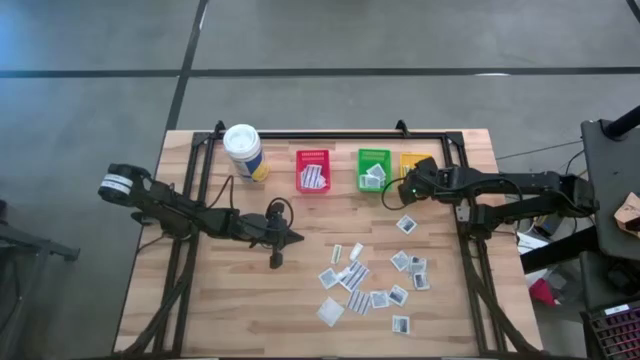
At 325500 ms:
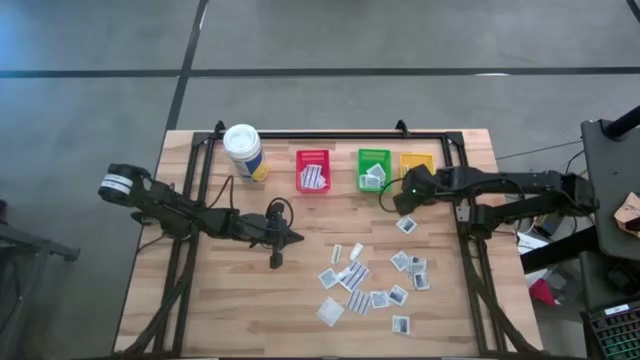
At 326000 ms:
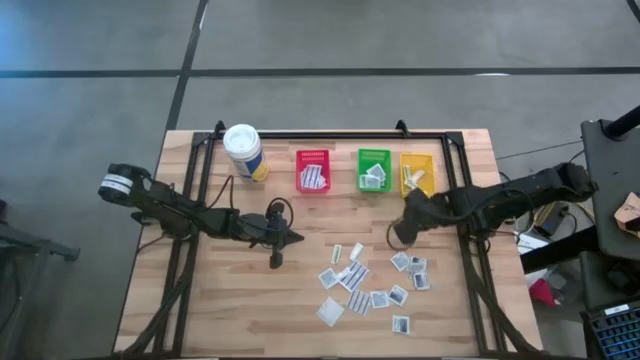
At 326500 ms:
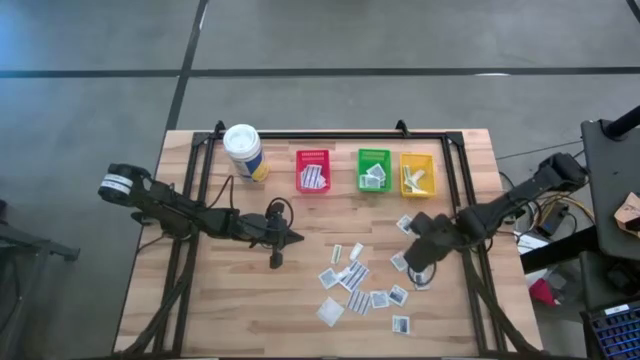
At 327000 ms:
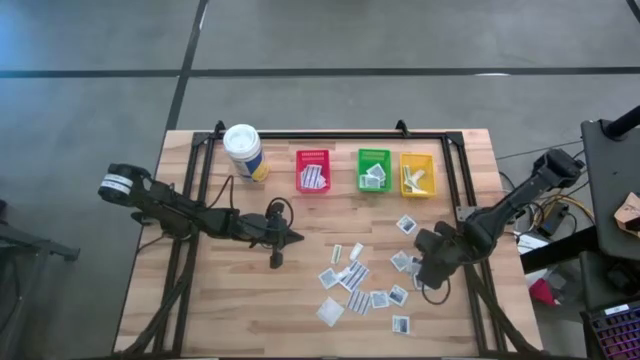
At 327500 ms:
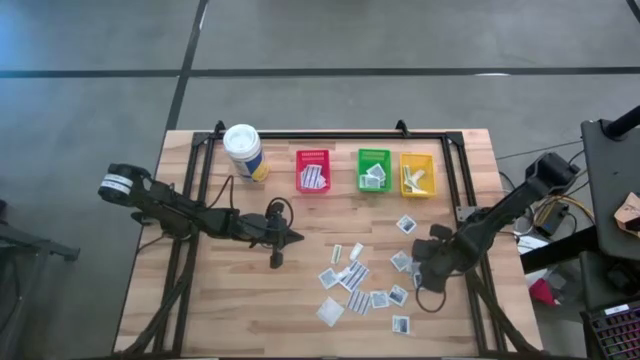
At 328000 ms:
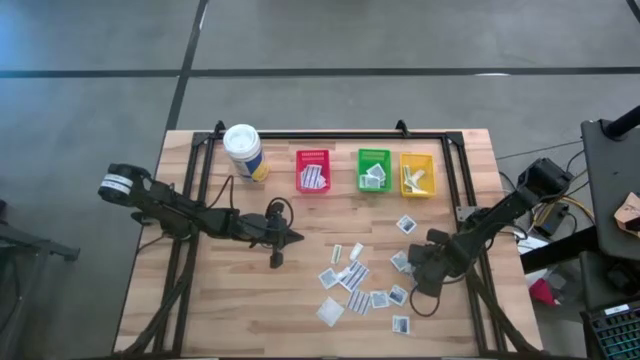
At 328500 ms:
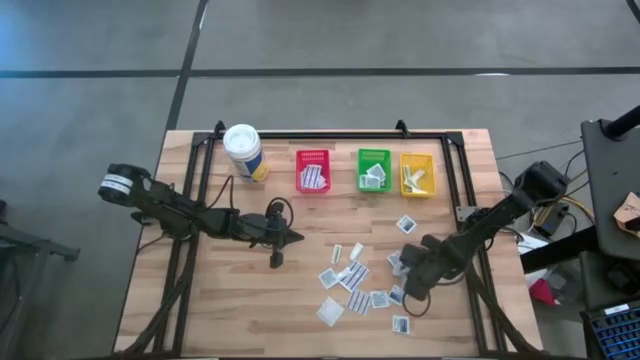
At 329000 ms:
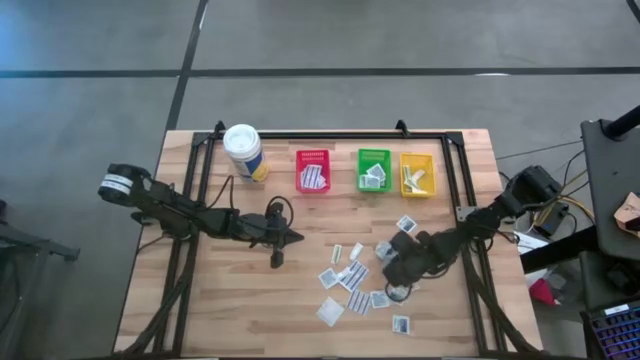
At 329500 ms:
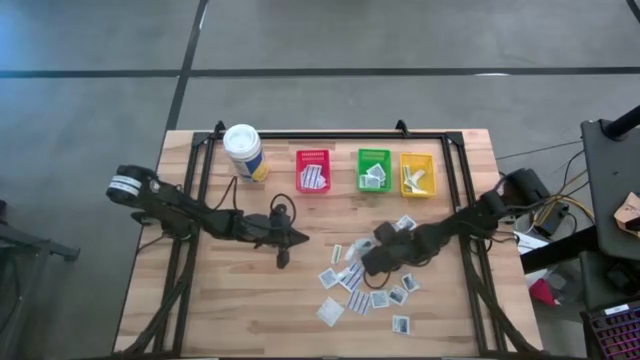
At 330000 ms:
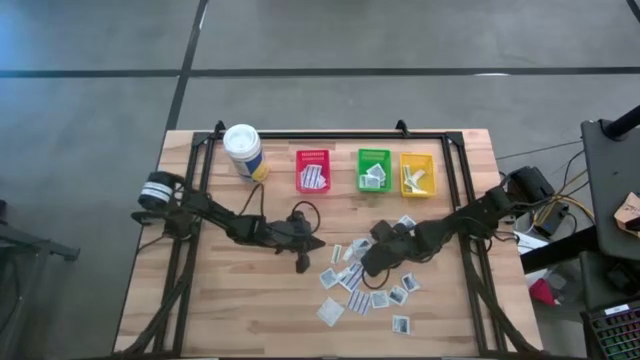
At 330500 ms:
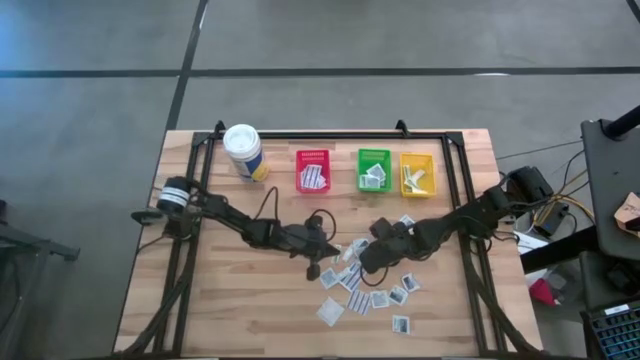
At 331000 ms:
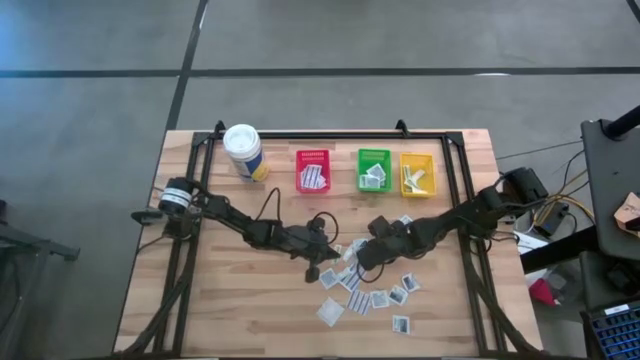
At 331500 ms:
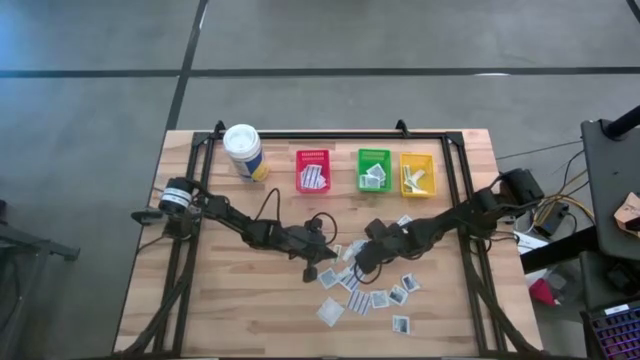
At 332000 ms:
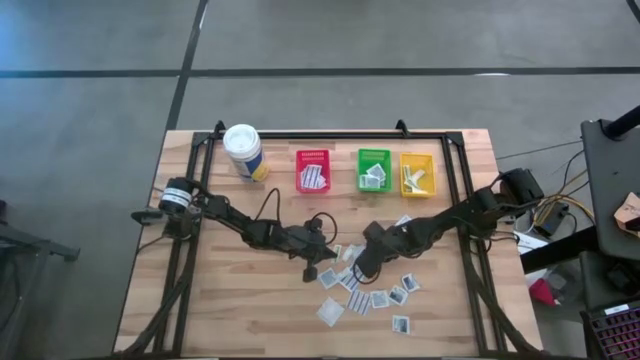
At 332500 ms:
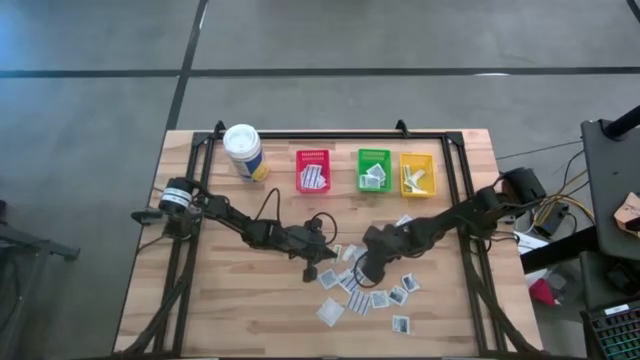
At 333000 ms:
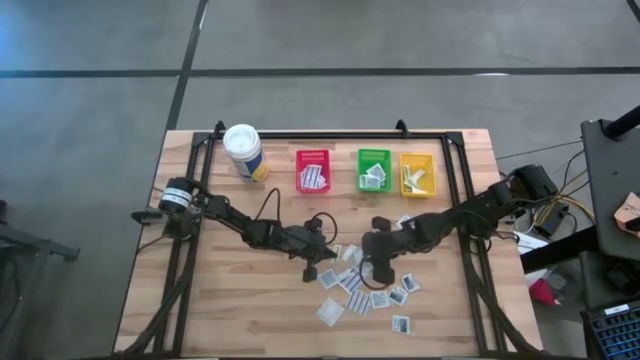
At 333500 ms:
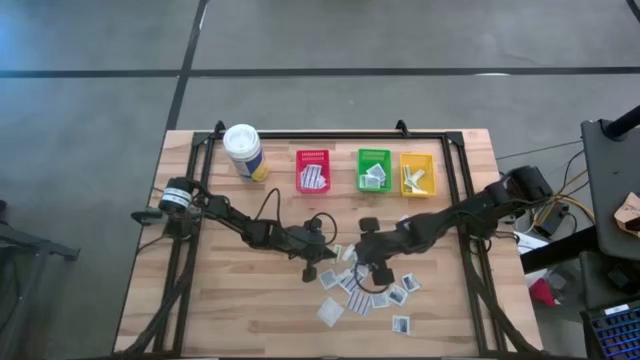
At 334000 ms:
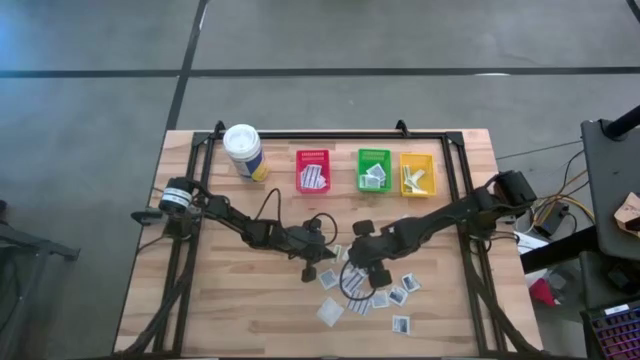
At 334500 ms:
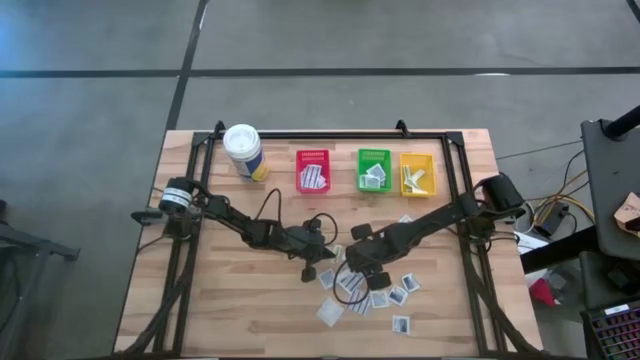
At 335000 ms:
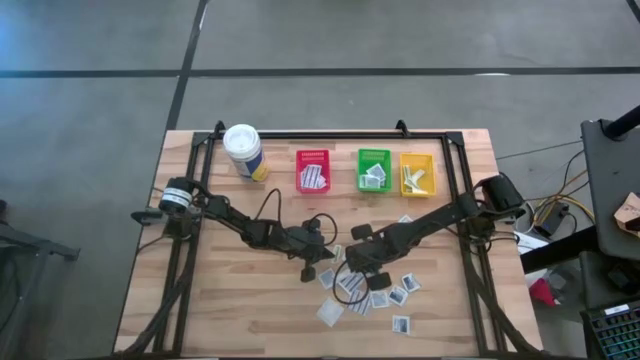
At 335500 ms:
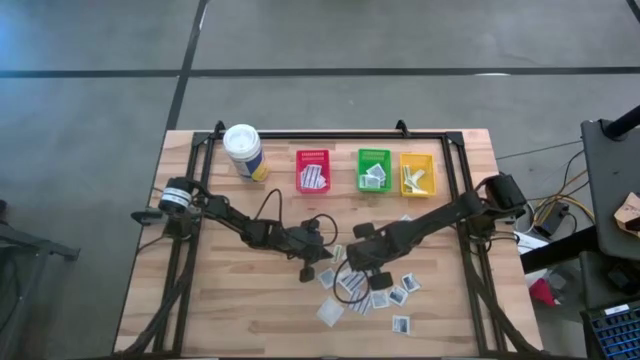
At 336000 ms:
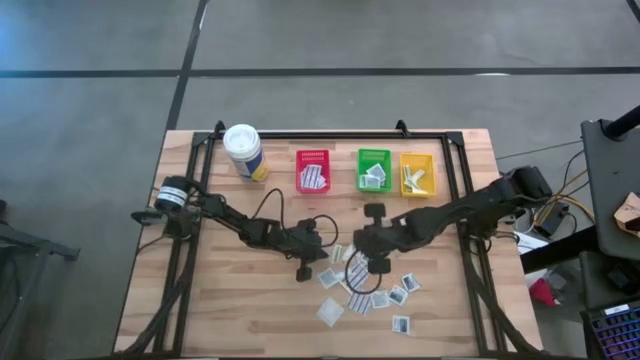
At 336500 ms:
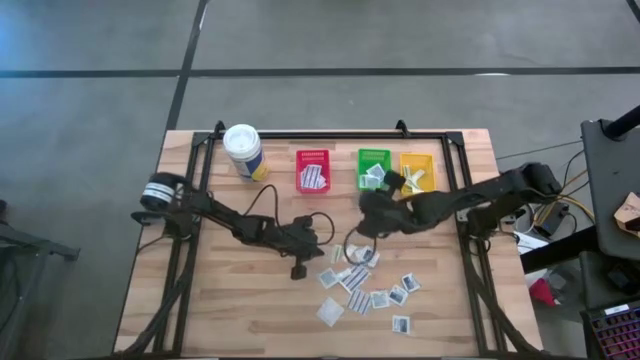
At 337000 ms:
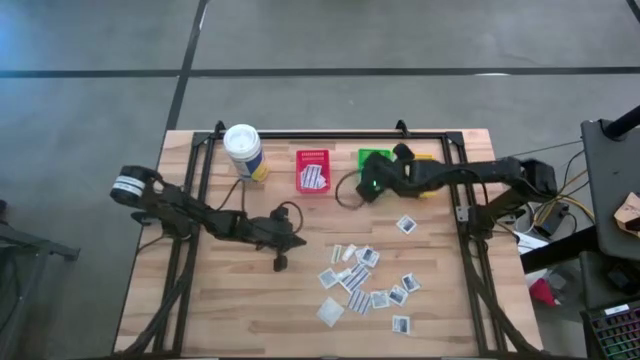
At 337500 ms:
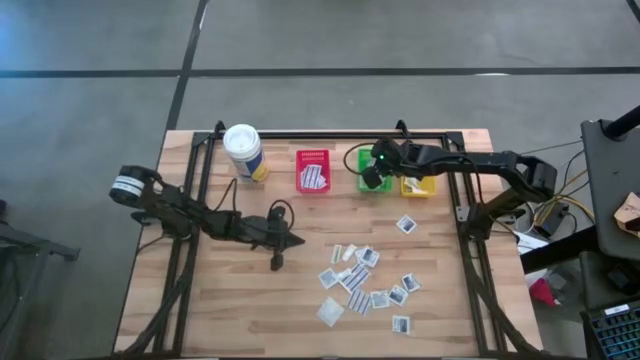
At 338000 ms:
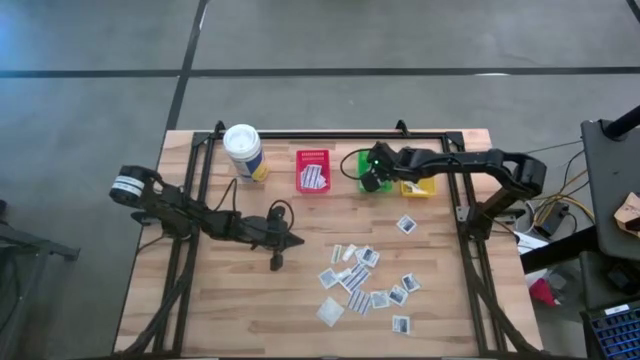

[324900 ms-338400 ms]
Task: Pick & Place First Aid Supplies
Put the alcohol pad in the green bin

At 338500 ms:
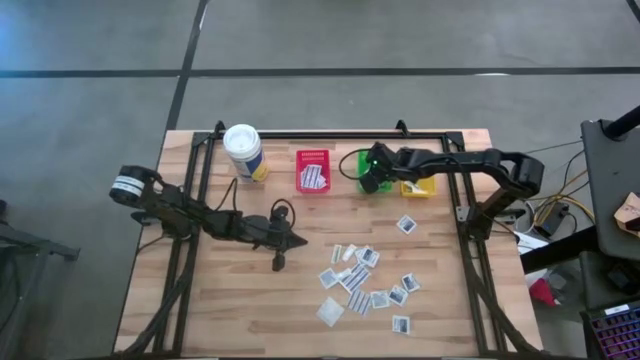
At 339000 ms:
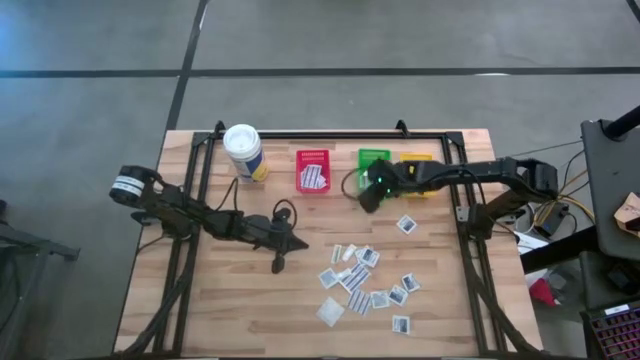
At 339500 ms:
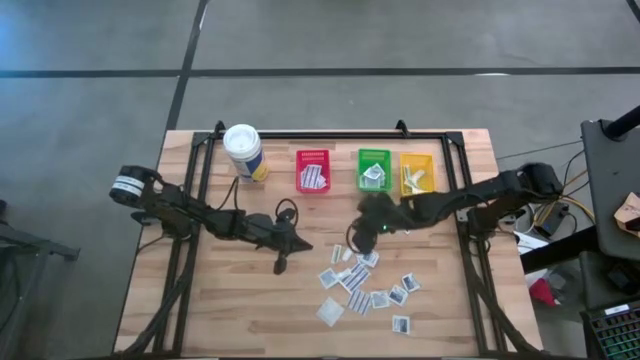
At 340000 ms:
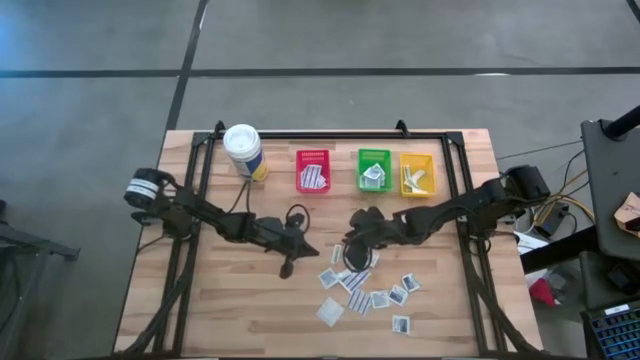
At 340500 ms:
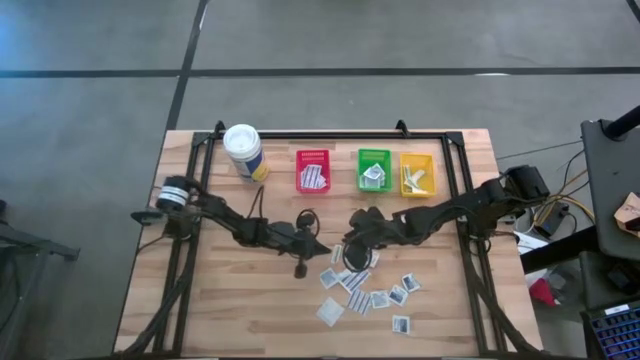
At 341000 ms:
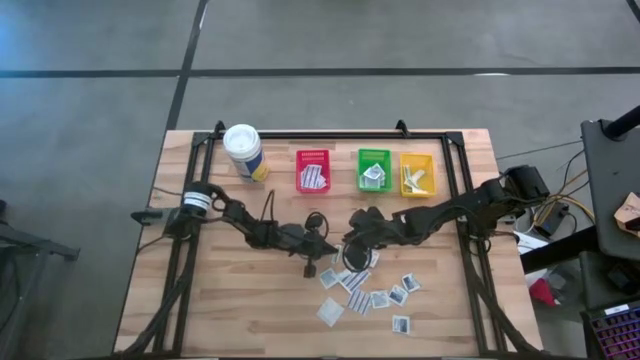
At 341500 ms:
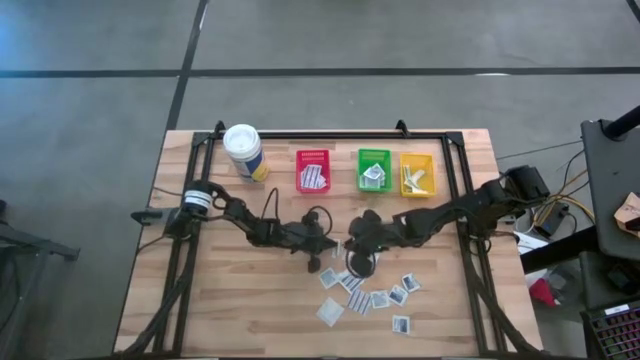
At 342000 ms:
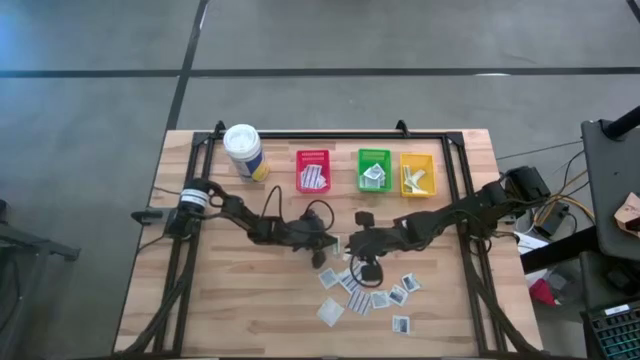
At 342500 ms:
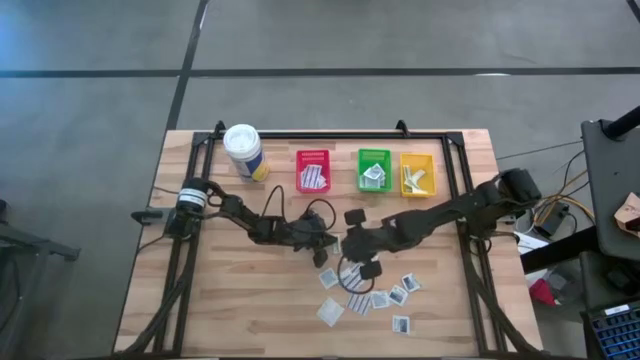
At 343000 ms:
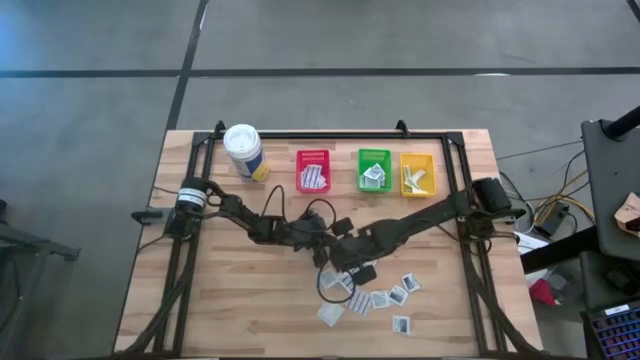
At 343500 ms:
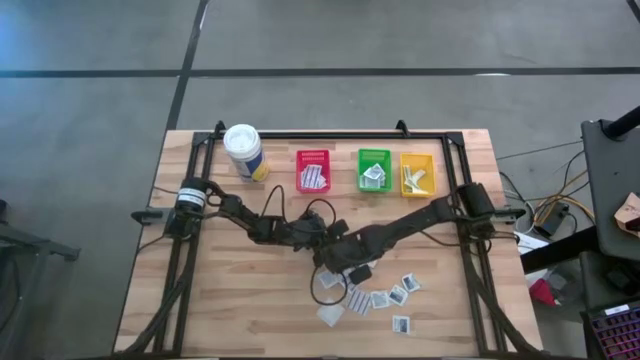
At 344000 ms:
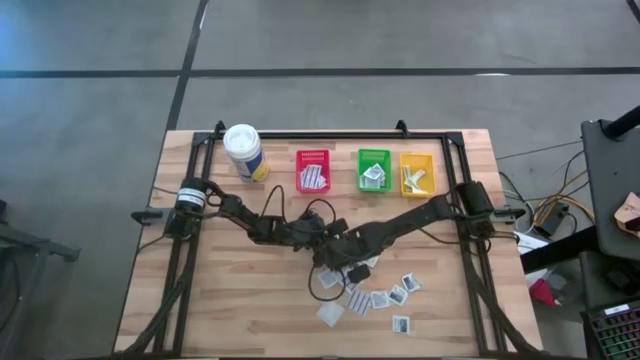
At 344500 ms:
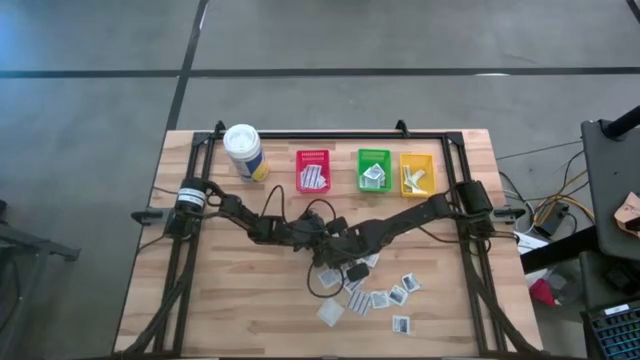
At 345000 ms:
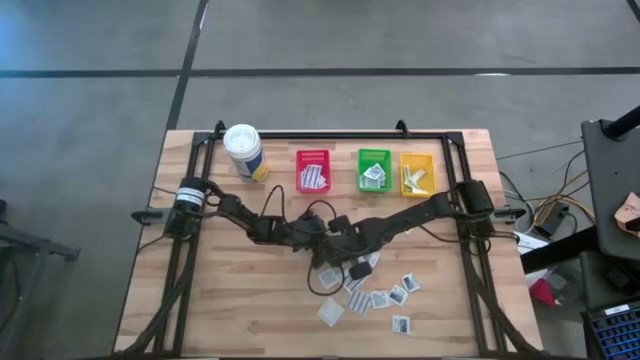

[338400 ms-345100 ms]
Put the green bandage in the yellow bin
